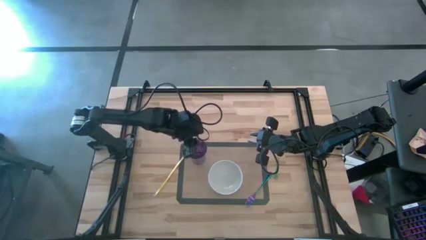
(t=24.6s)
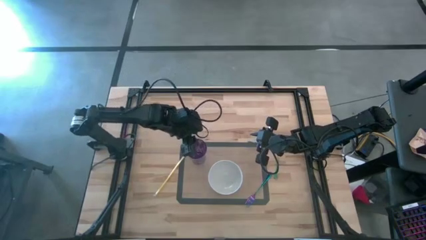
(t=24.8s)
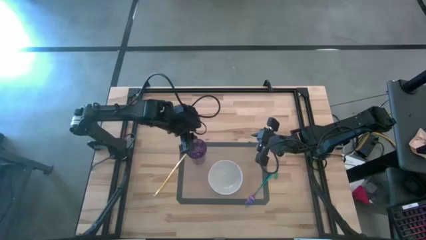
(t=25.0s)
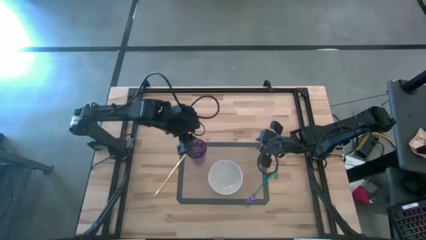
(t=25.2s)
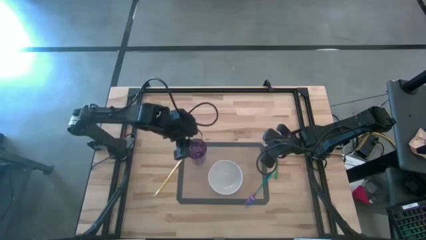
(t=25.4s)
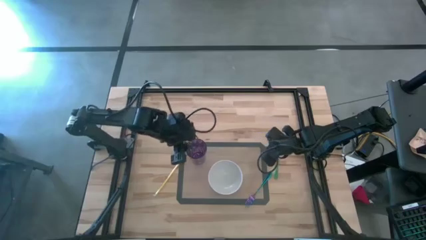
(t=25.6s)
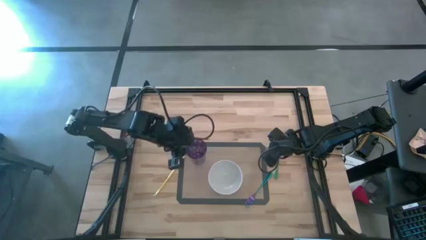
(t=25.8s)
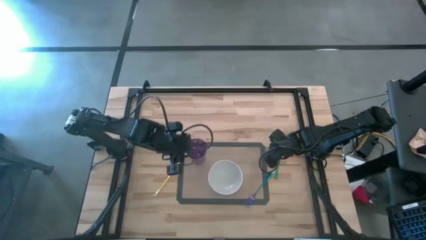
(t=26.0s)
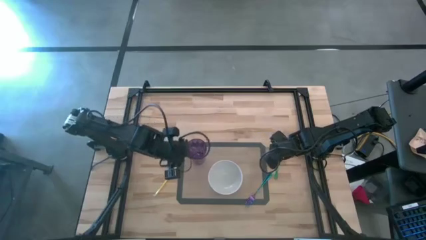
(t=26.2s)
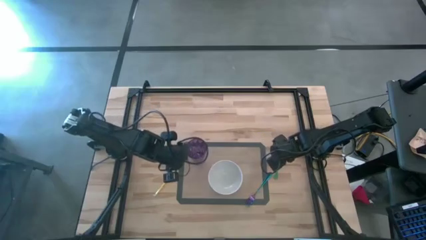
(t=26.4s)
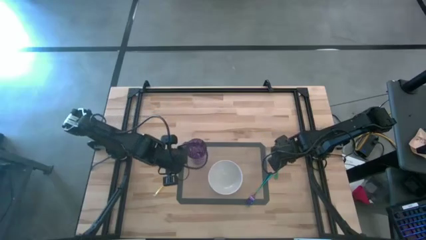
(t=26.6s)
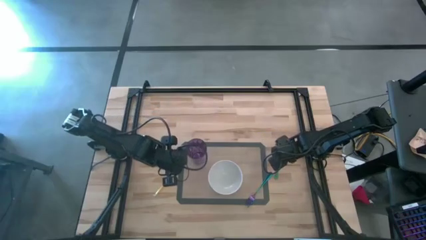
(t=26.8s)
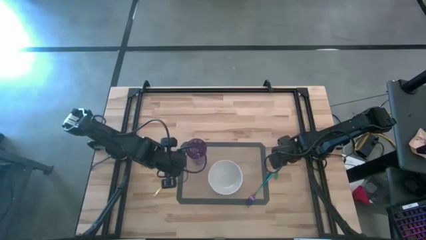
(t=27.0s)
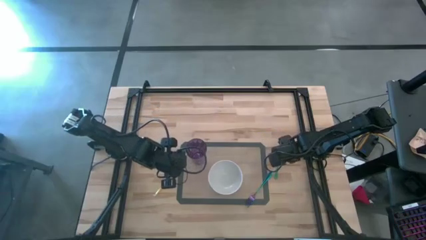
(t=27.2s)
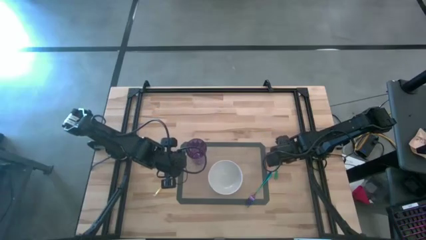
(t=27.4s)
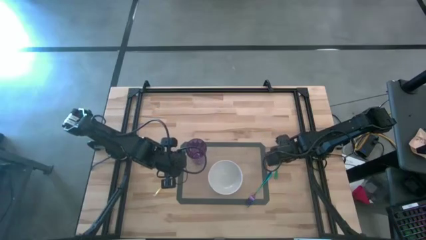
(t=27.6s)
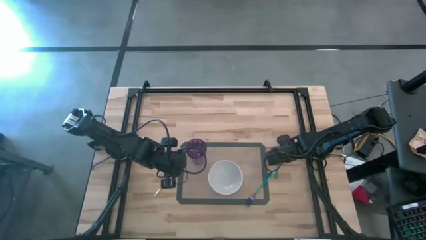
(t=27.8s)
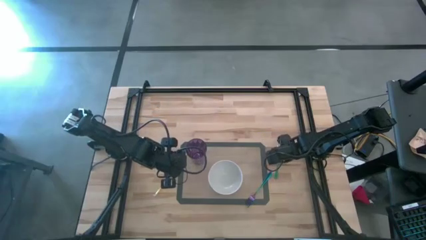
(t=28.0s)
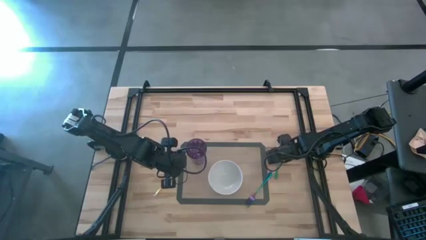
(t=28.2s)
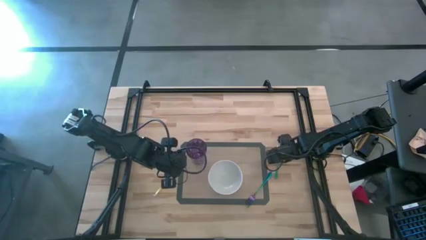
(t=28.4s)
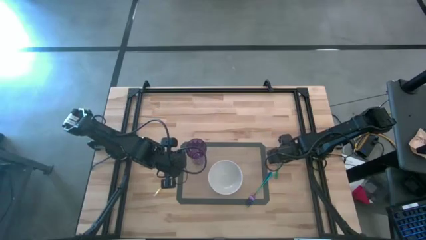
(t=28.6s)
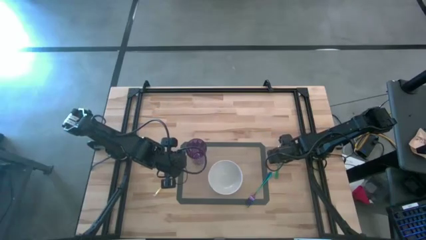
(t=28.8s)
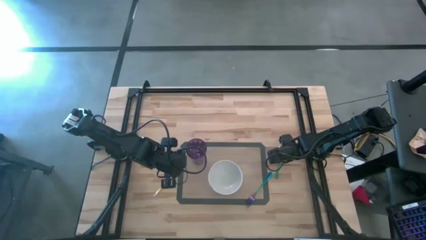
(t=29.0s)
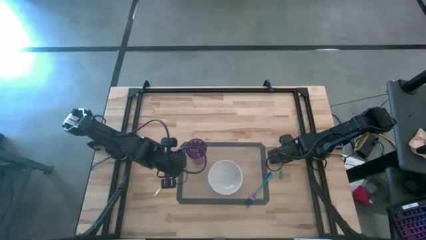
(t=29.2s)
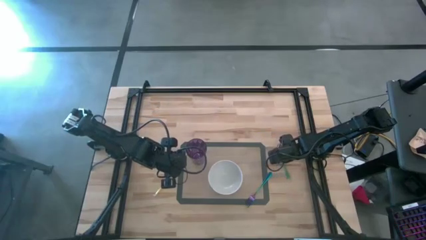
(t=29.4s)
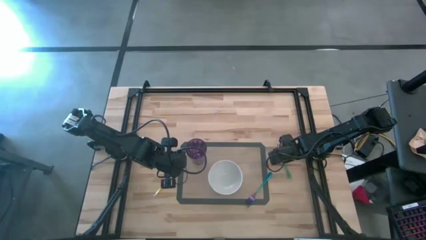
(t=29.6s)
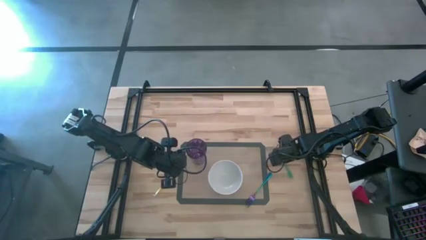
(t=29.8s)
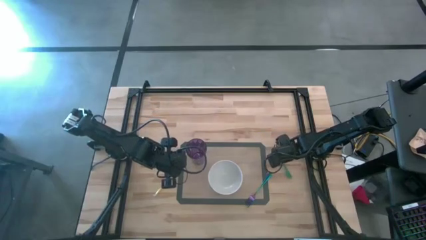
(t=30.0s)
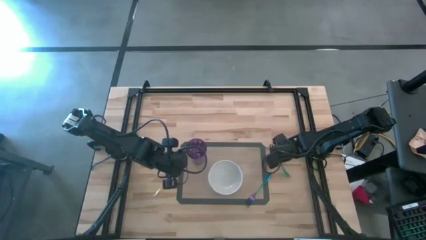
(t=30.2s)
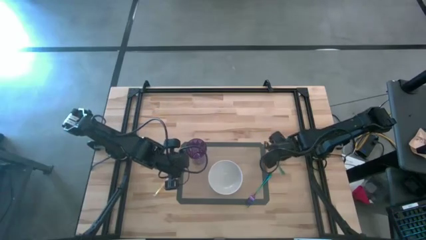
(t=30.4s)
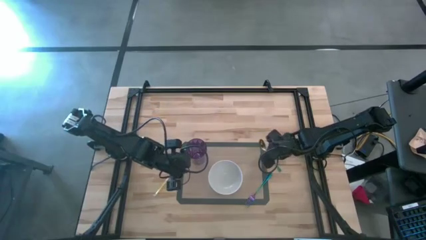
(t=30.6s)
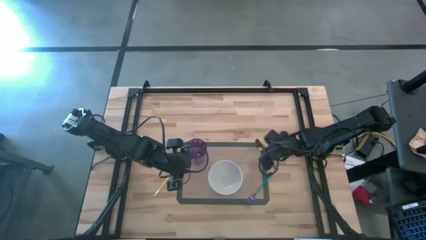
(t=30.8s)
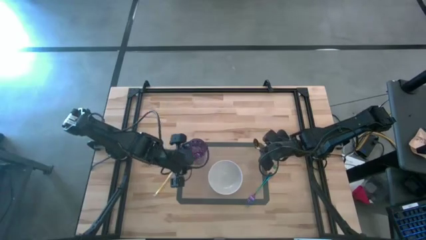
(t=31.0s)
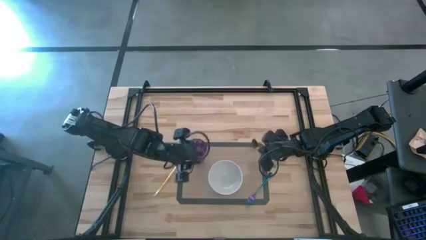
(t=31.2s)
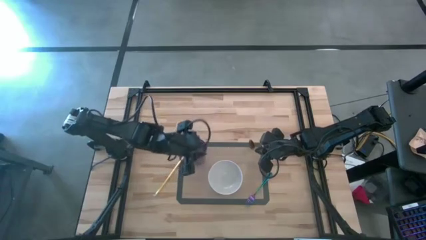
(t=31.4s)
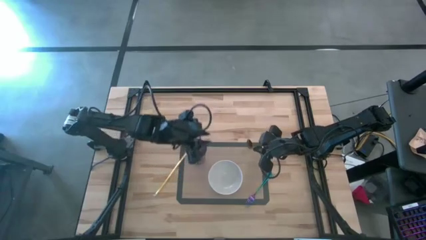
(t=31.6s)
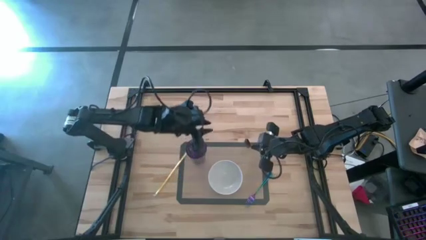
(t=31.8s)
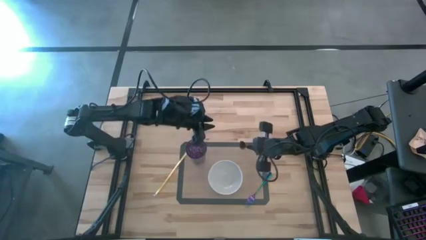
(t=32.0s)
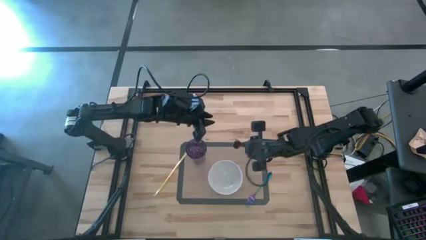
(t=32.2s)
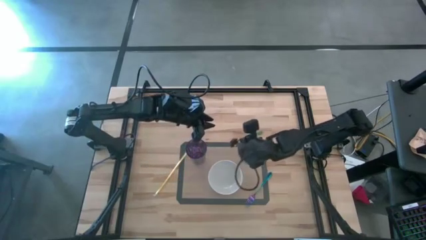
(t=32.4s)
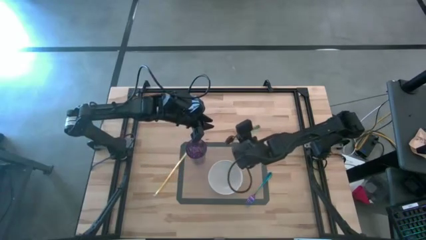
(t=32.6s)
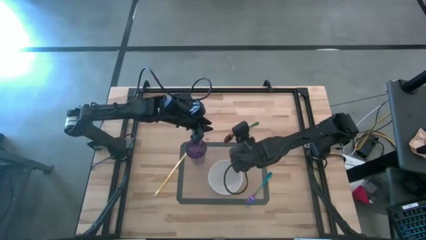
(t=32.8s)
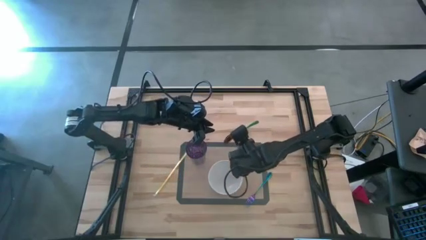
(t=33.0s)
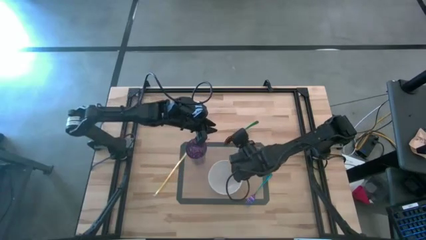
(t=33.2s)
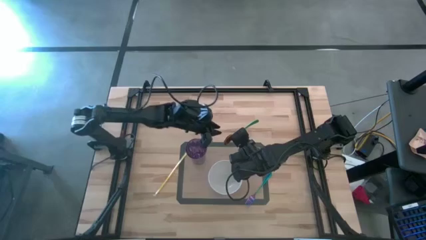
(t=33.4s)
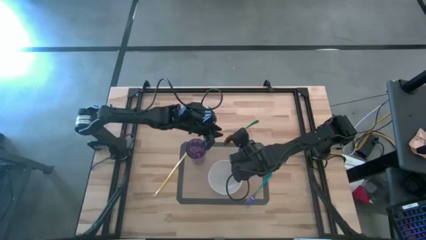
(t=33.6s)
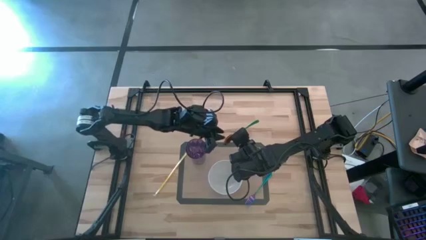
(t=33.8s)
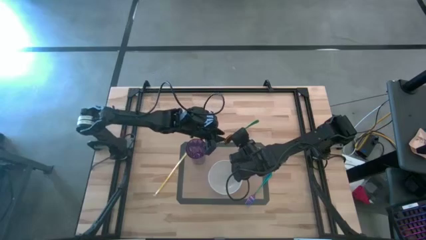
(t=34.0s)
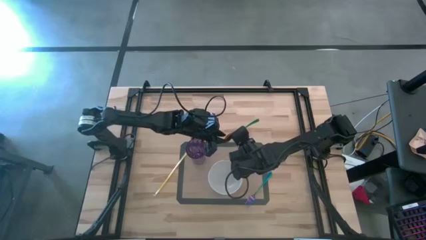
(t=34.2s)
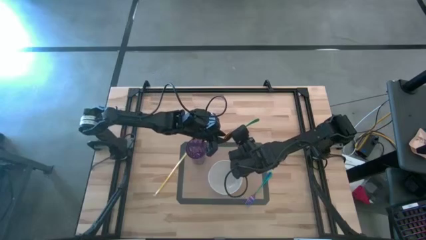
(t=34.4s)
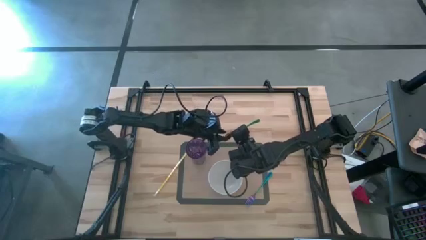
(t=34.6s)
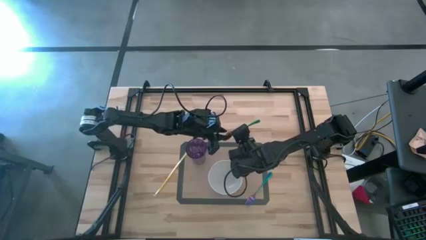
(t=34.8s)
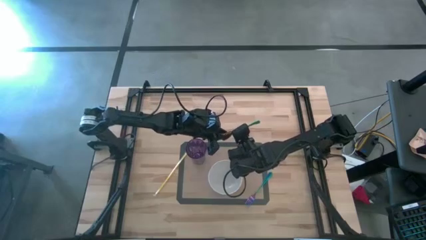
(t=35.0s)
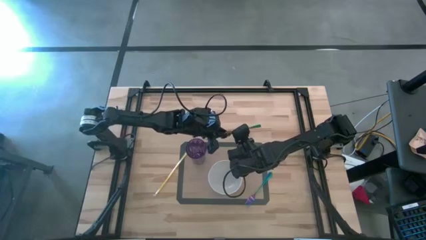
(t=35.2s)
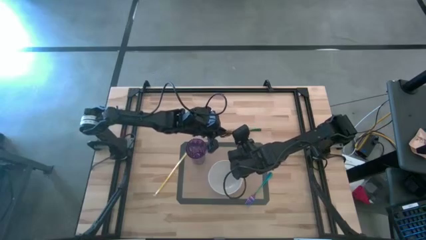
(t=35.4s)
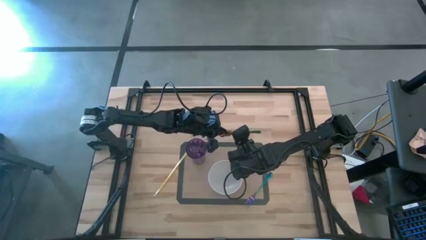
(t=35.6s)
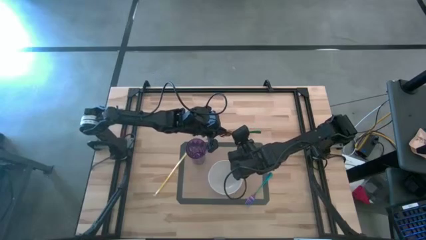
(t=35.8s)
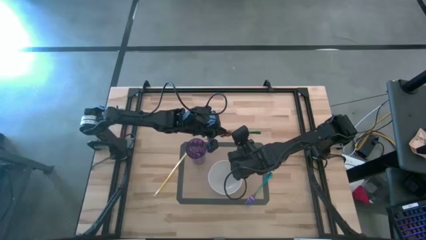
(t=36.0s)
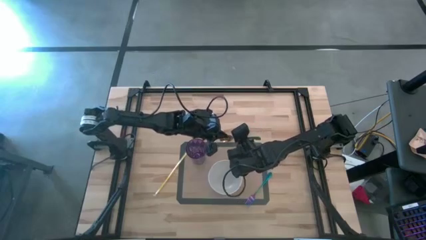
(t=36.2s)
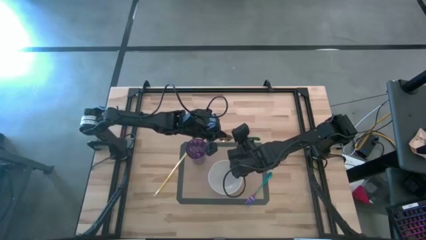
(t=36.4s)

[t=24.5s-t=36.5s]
Task: Pick & Place Utensil
Put the green spoon on the white bowl

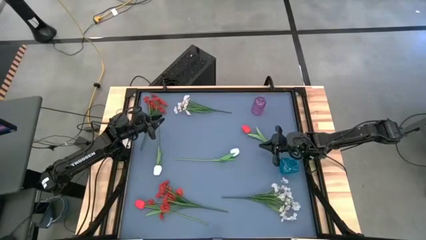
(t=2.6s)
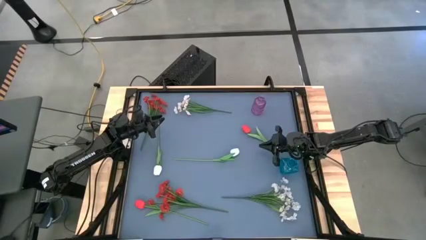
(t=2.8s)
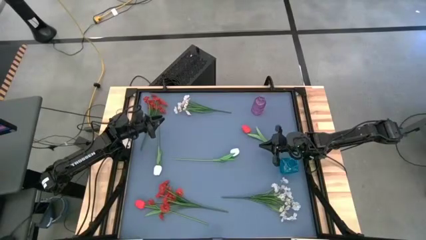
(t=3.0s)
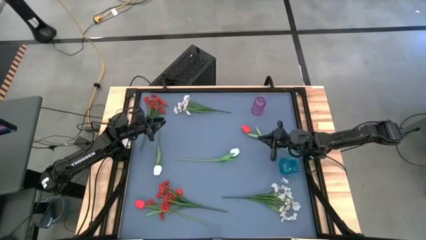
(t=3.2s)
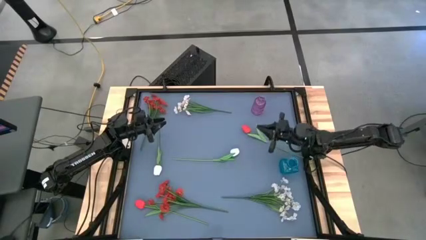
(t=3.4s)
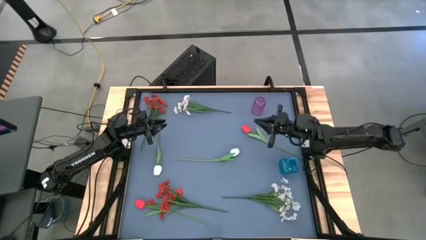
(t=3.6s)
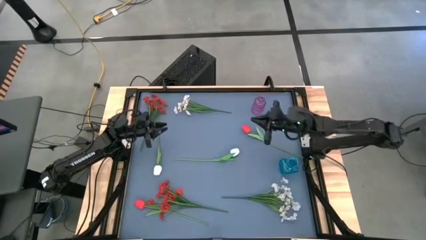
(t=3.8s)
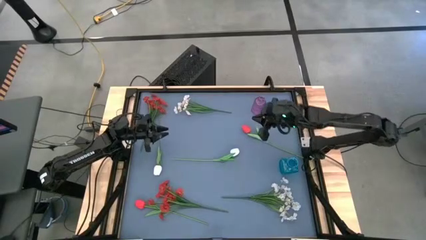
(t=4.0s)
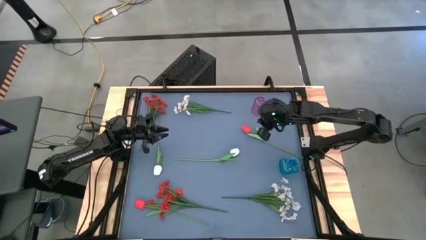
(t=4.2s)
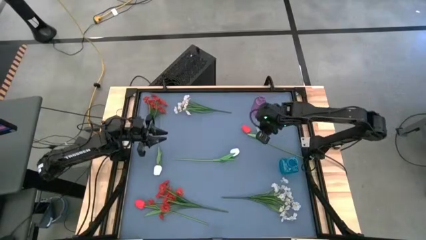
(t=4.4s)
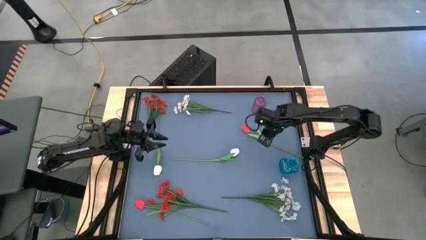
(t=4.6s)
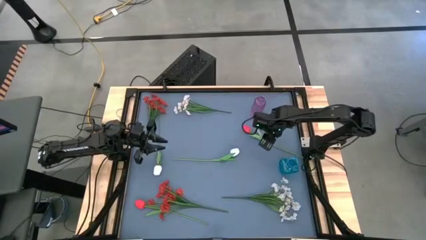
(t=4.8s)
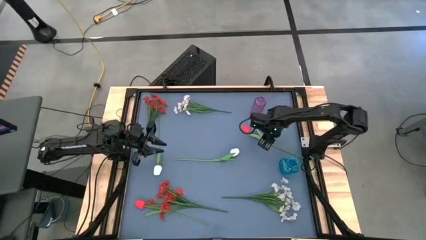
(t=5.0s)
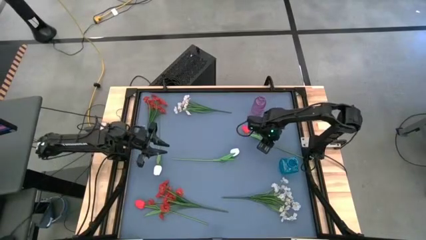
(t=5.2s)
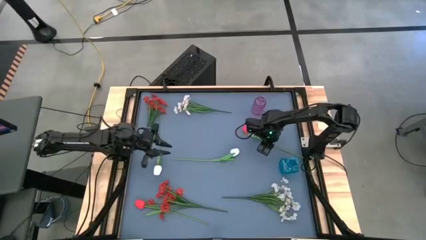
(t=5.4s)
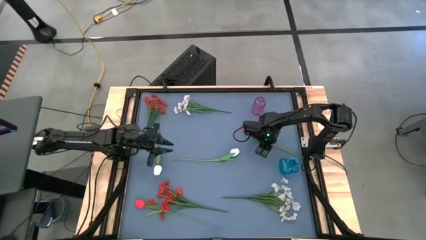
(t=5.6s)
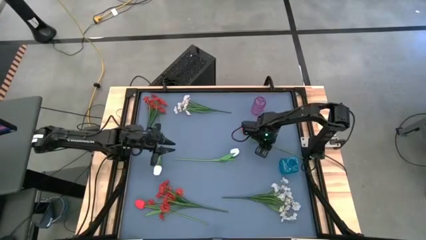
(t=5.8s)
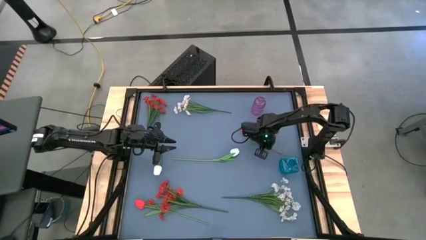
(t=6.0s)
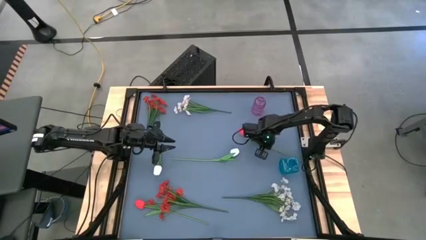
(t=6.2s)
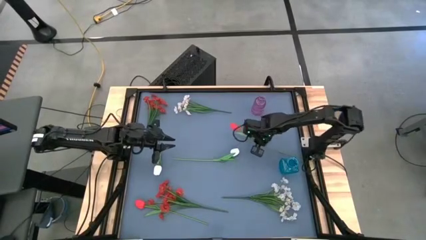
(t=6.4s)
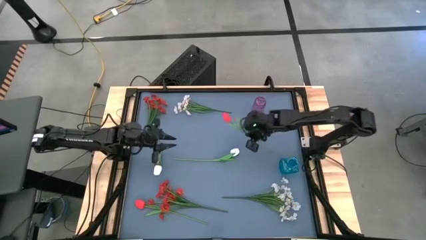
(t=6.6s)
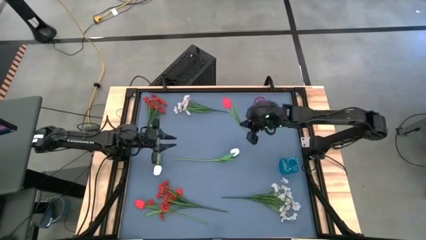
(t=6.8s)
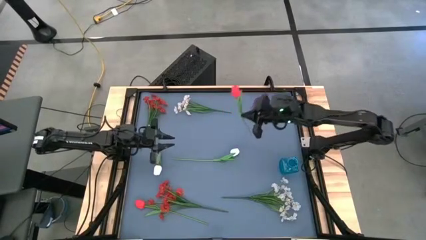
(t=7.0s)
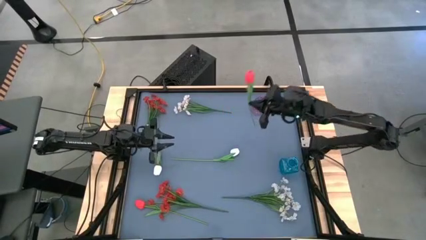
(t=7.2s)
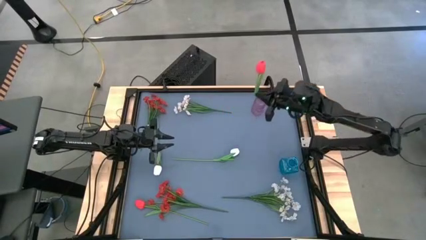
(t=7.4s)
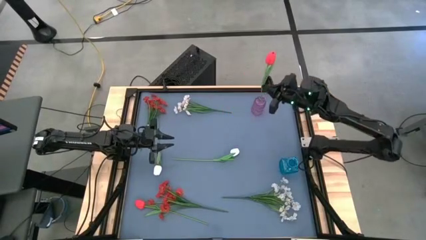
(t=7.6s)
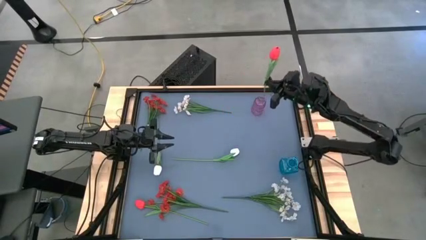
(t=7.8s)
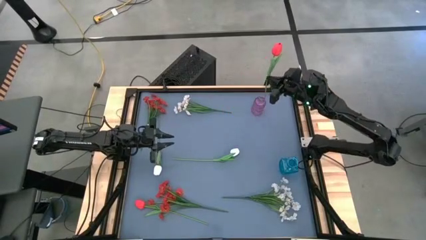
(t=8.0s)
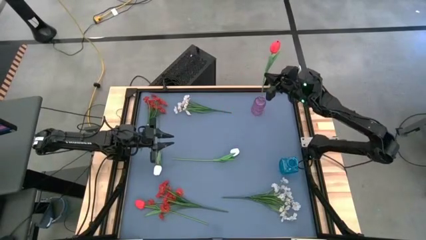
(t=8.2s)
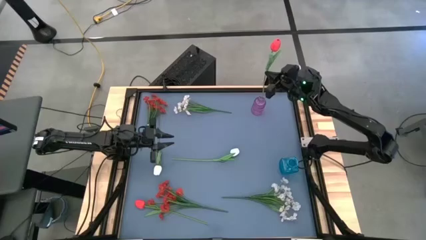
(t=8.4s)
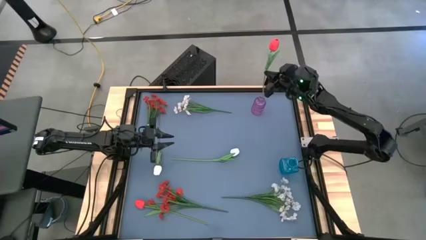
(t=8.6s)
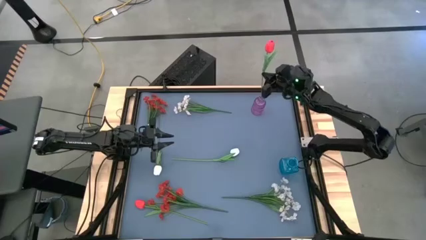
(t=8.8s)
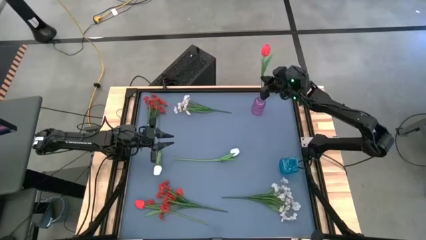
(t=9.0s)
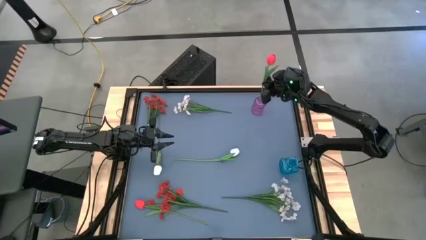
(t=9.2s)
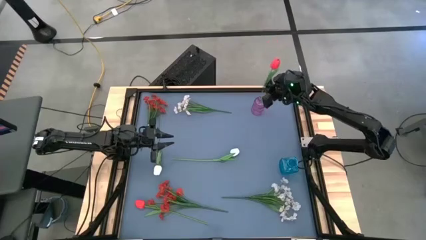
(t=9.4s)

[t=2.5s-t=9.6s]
Task: Sort flowers into vase by color
Put the top red tulip into the purple vase
